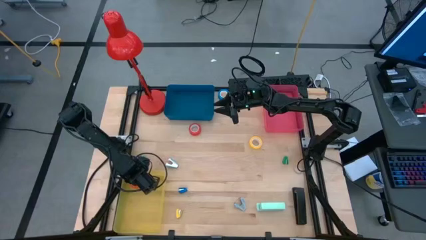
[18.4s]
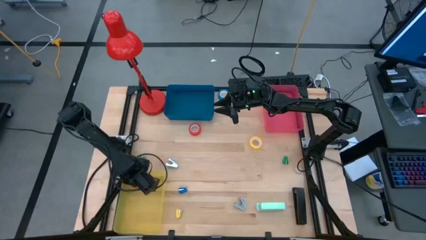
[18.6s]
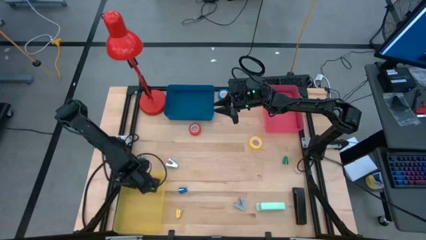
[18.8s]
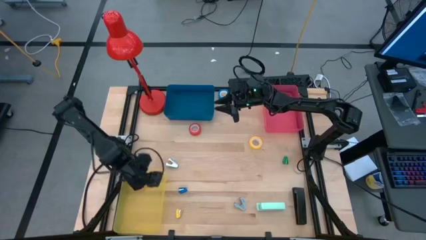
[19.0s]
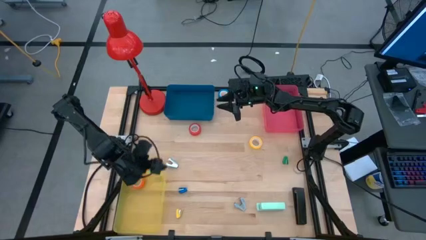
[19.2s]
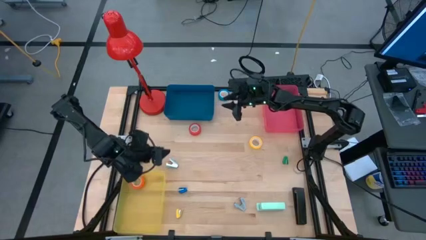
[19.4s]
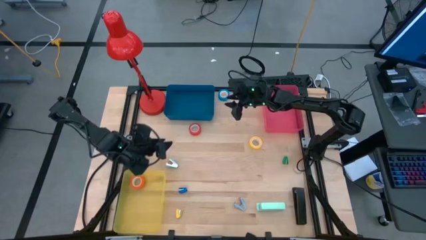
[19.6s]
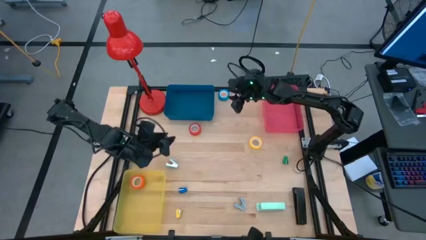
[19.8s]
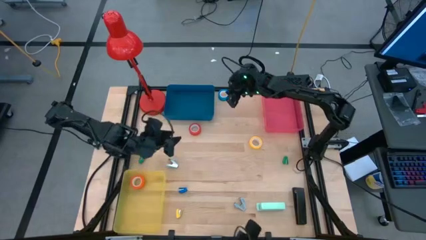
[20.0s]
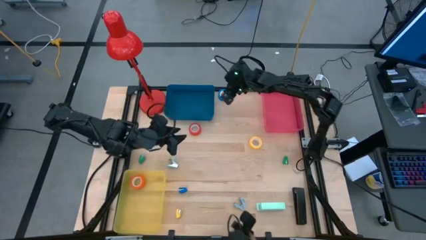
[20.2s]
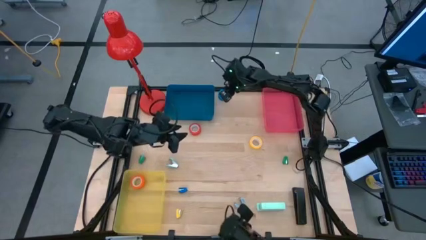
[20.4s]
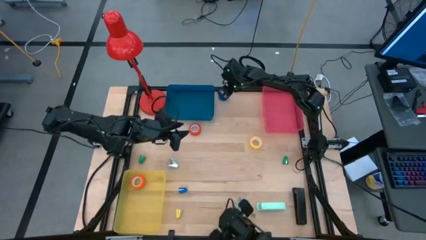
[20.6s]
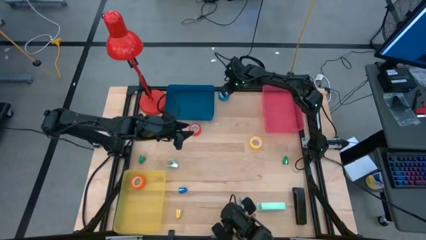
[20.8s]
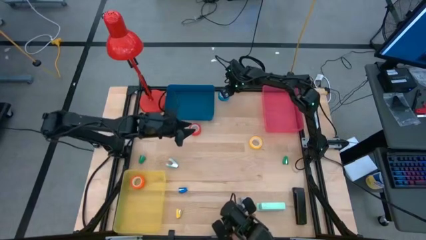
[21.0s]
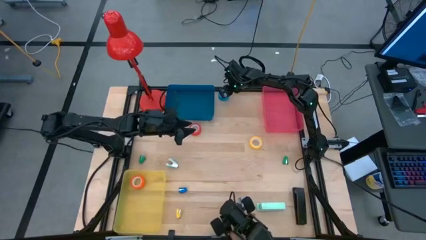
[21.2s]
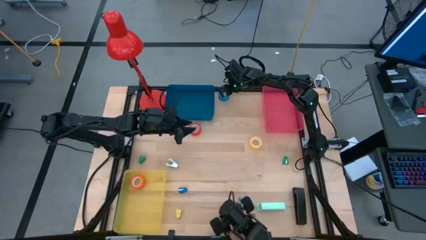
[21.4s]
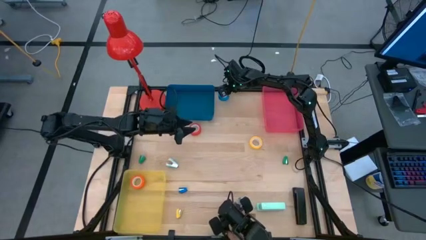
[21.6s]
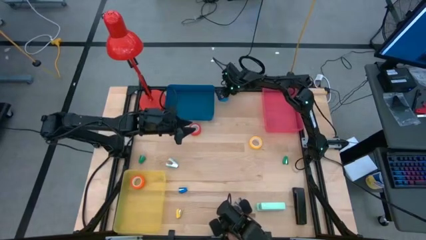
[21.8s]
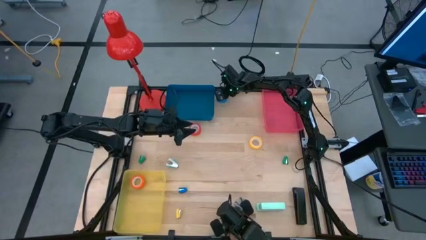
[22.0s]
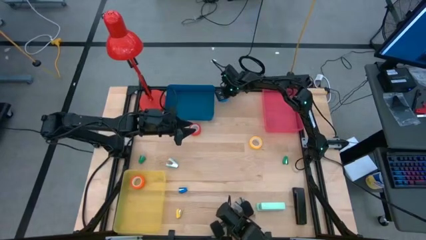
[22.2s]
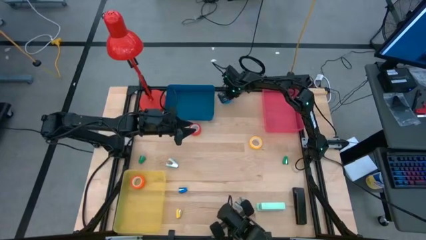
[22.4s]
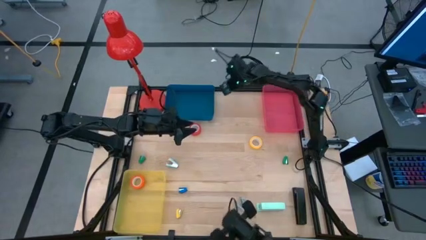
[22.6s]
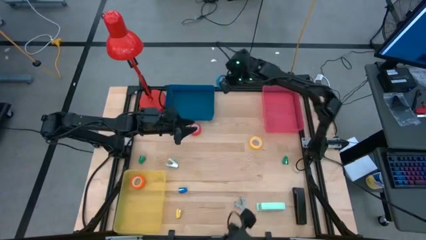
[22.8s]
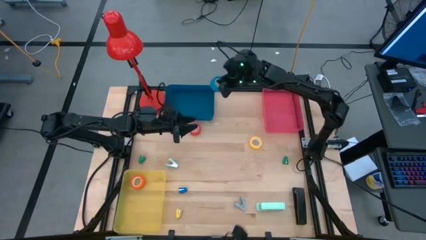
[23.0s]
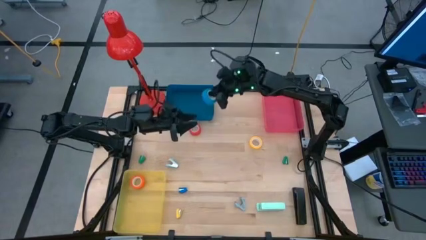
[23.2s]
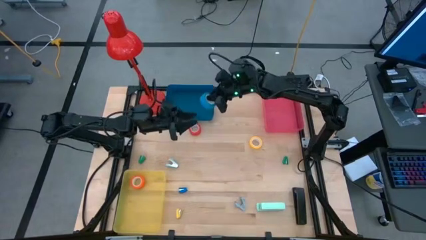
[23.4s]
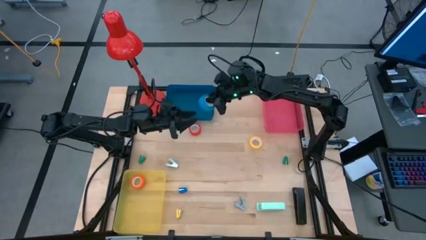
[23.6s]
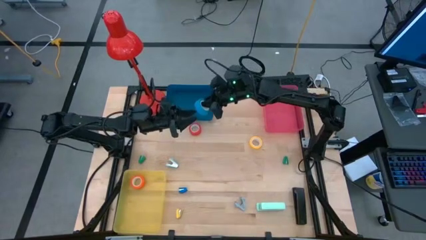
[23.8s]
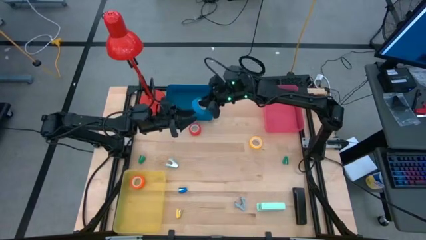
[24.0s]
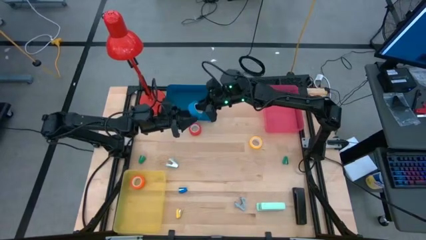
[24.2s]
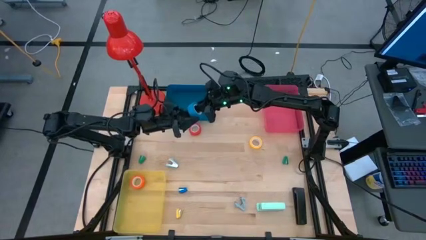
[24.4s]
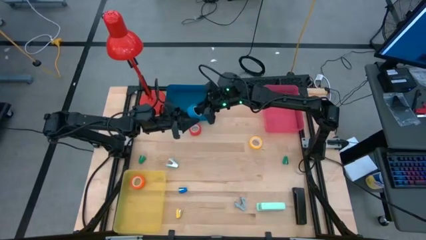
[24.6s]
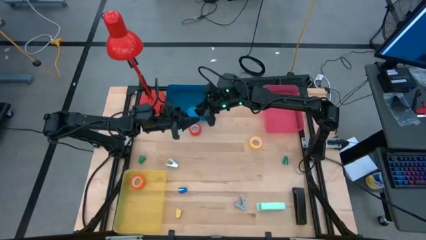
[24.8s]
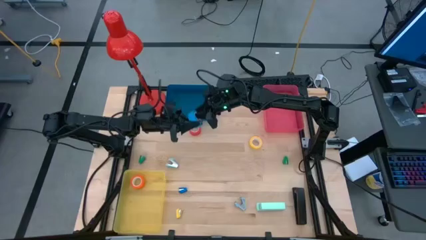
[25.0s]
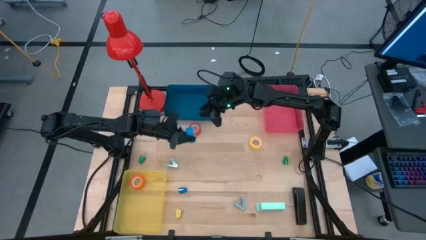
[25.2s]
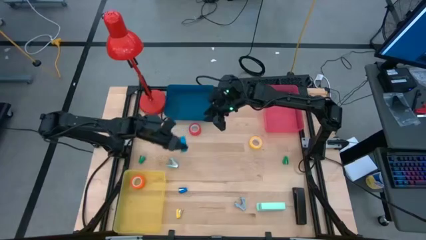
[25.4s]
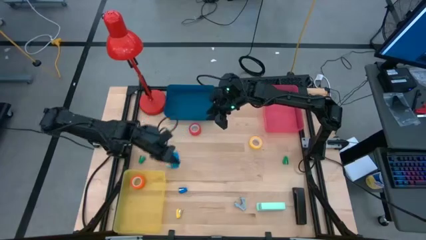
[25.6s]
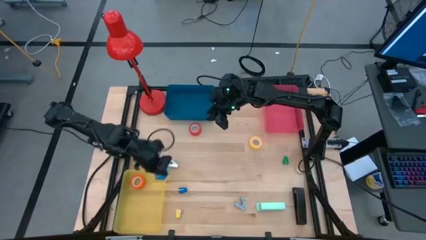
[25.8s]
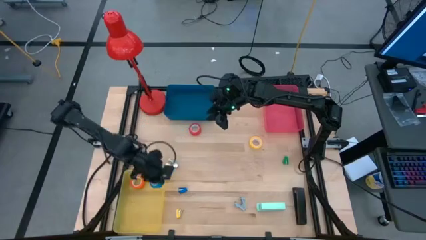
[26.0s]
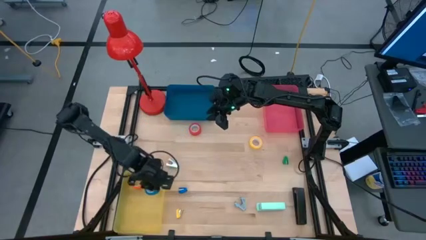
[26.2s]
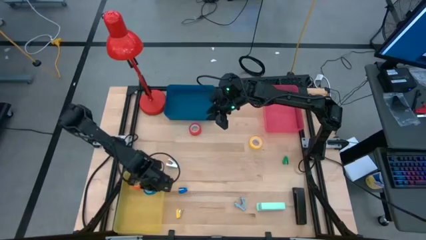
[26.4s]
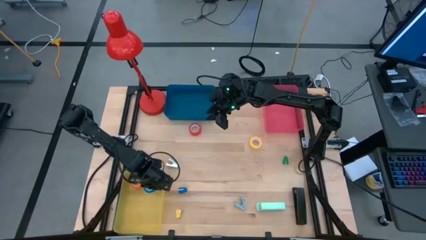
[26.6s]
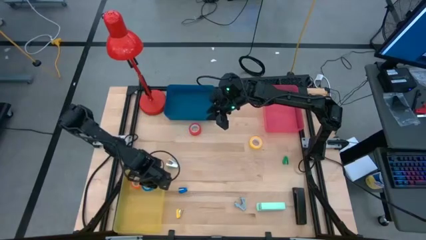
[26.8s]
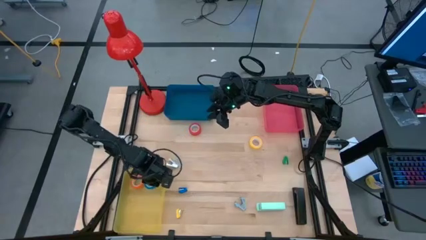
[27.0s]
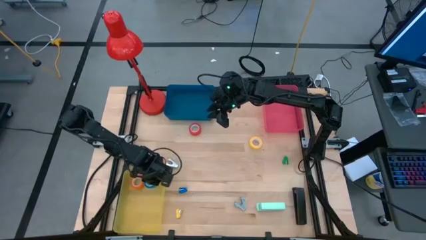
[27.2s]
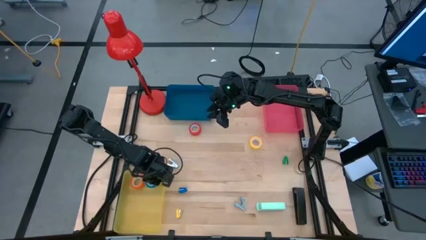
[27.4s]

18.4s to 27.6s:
Task: Pick and place Stapler, Stapler remover, tape
Put the blue tape into the yellow bin

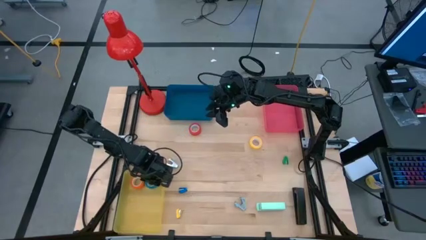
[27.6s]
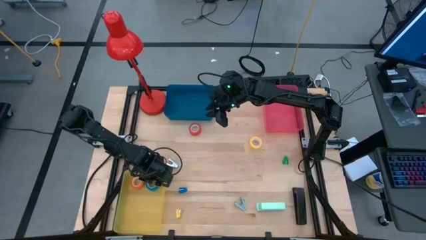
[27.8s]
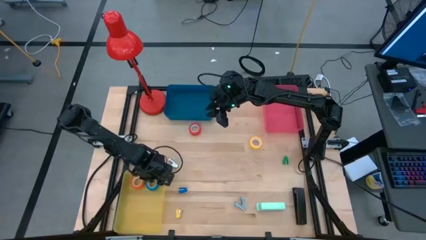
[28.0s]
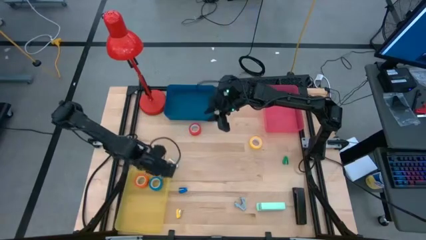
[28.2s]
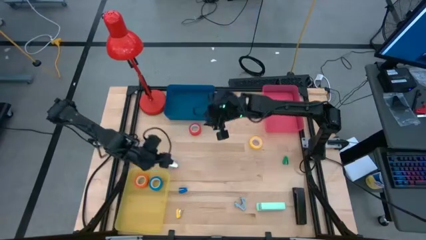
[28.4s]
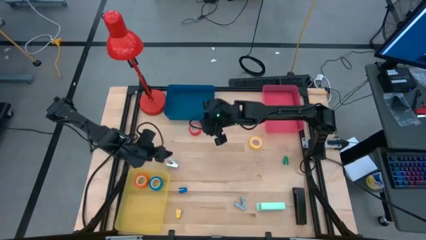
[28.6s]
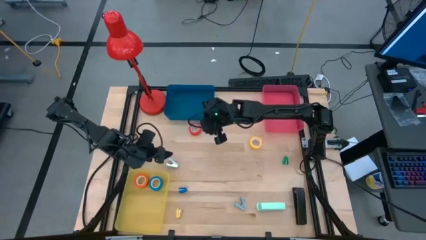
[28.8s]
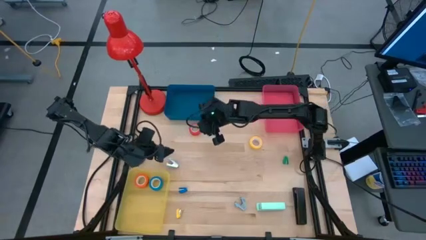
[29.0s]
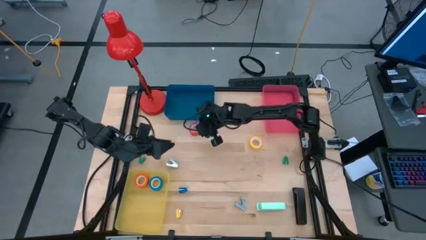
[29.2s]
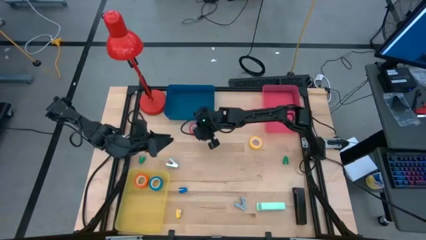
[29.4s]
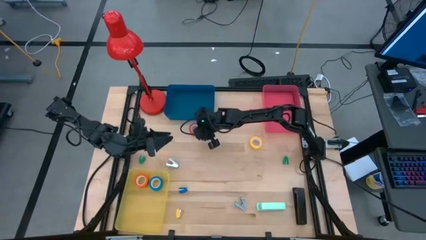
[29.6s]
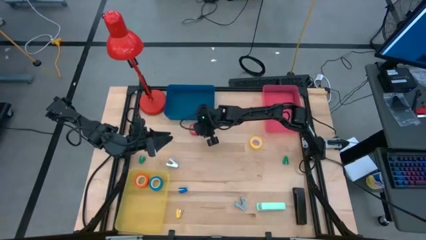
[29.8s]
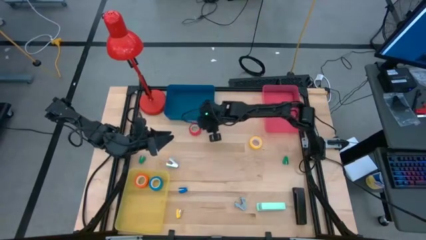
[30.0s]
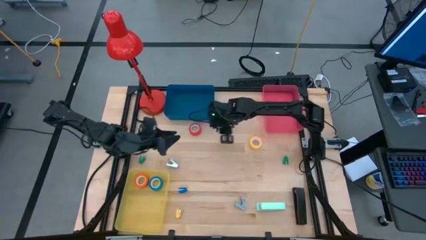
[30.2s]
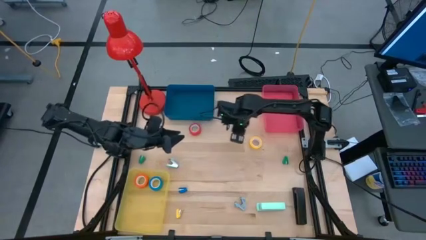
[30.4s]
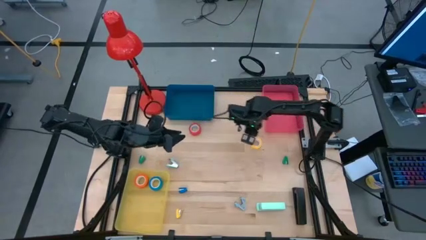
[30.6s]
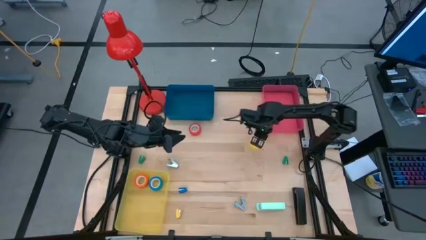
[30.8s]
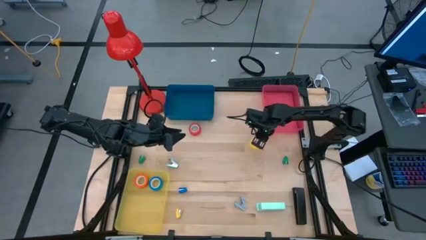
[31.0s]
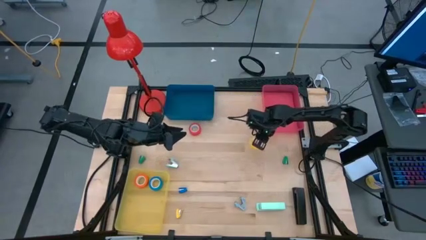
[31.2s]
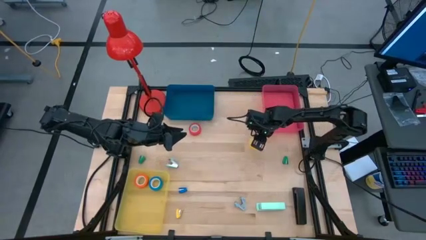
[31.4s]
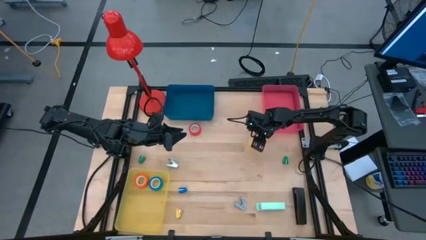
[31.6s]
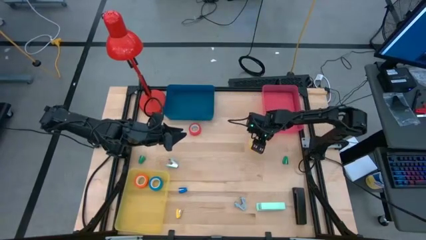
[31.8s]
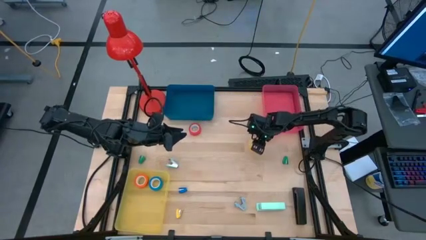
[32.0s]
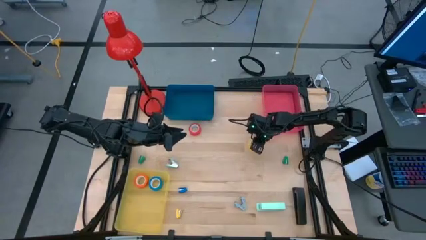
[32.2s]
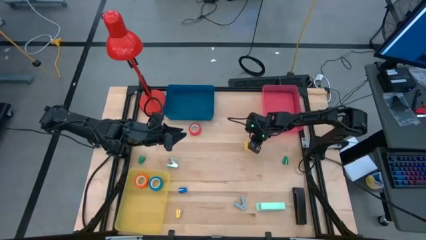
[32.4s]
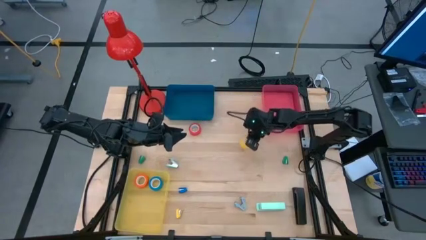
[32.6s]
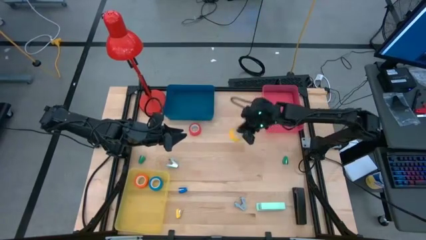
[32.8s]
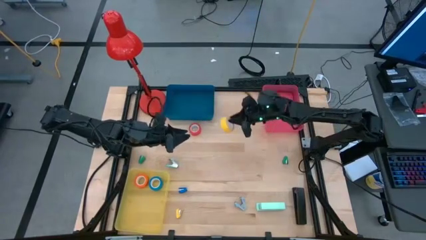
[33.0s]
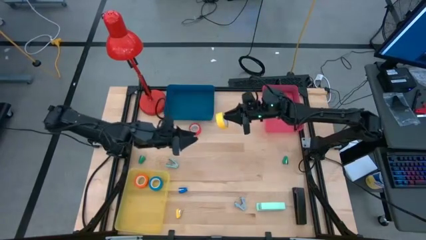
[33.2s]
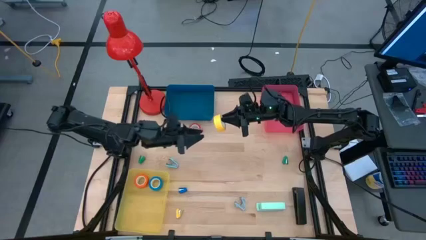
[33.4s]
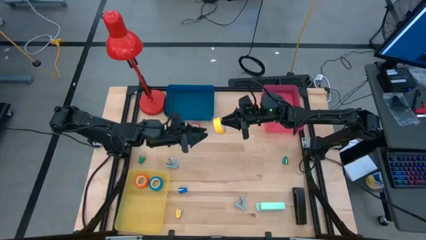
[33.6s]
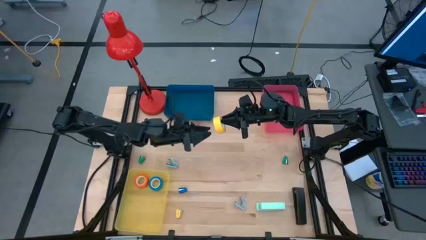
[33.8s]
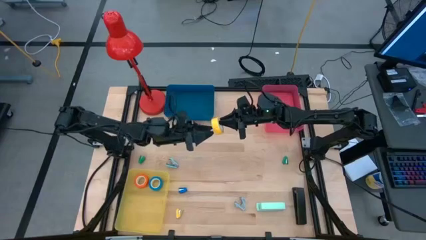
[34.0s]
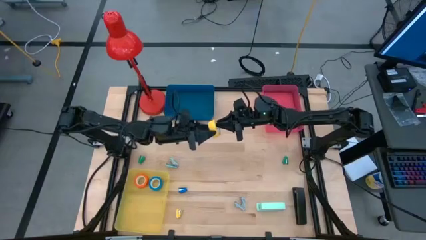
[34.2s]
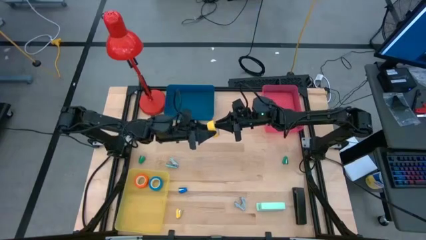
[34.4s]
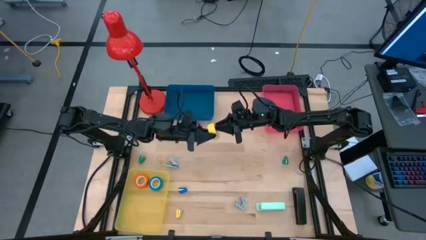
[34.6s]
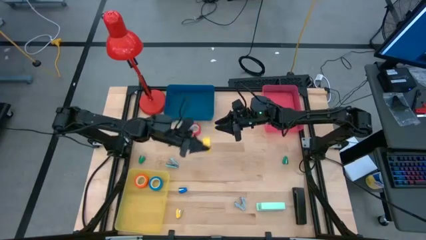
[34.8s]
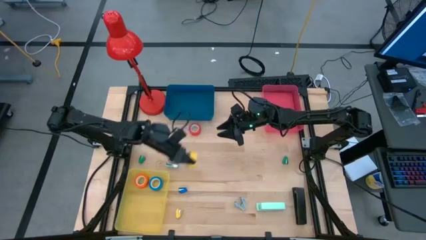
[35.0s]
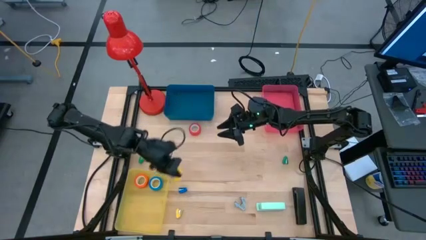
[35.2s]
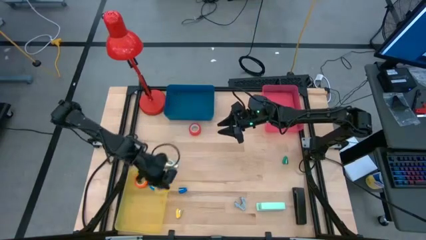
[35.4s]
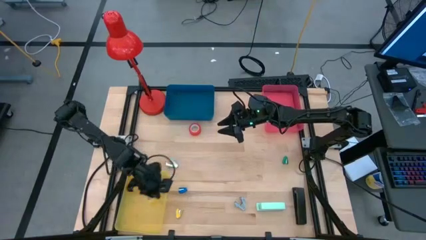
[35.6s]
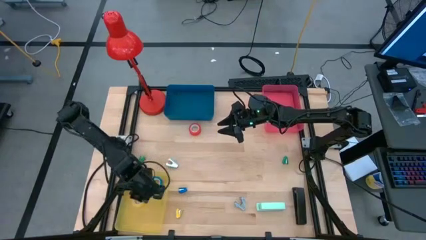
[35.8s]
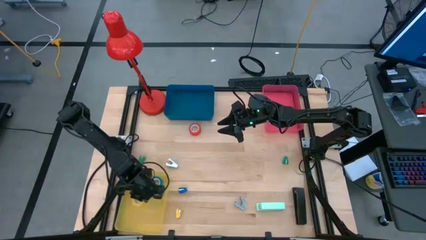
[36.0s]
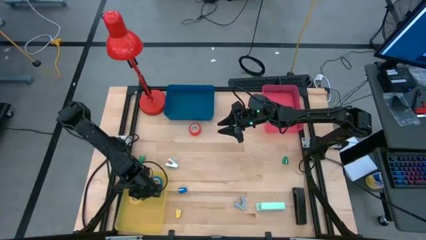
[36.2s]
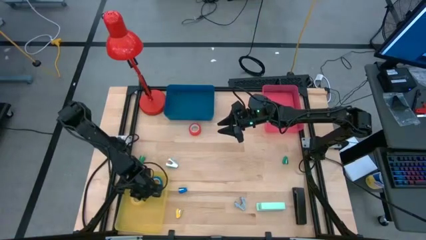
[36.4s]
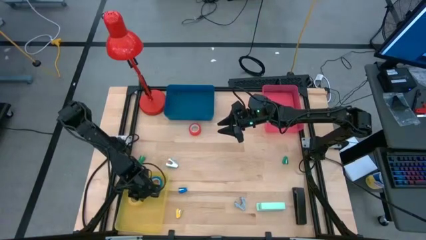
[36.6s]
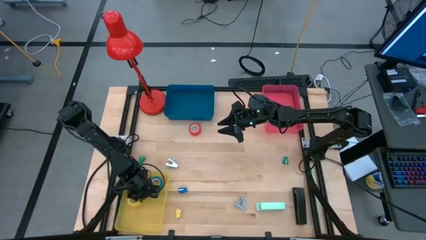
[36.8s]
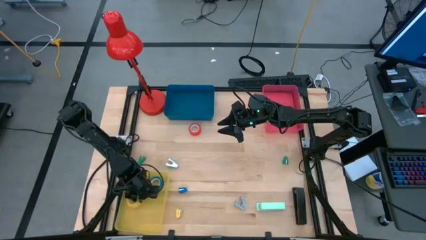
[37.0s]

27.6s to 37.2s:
Put the yellow tape into the yellow bin
